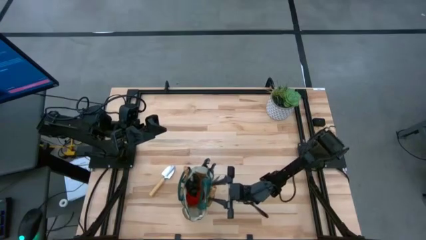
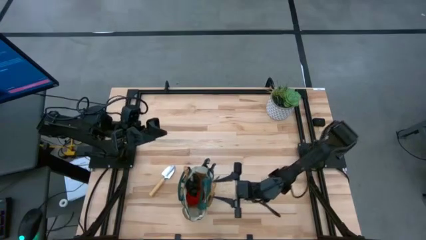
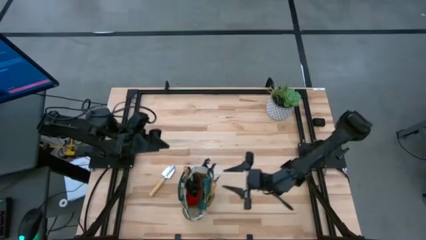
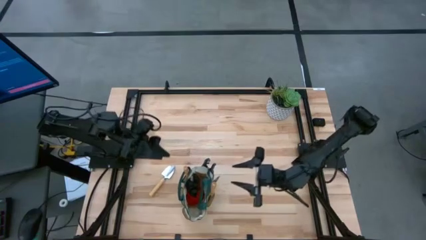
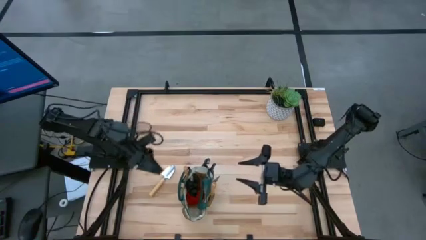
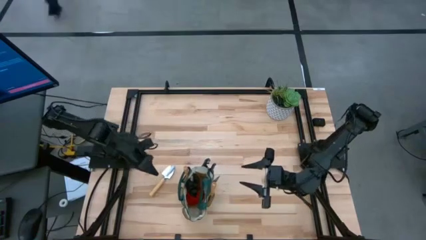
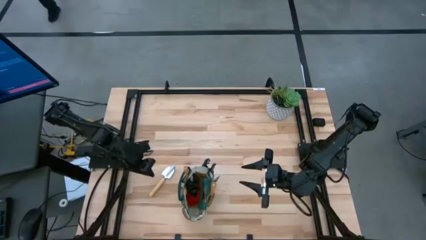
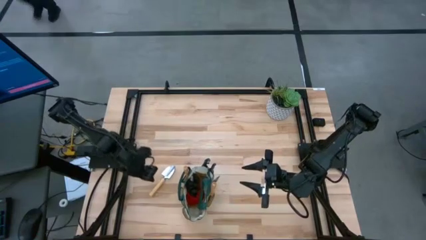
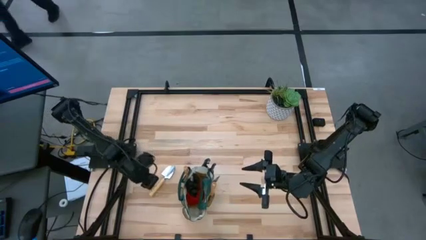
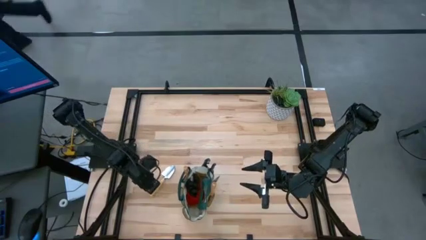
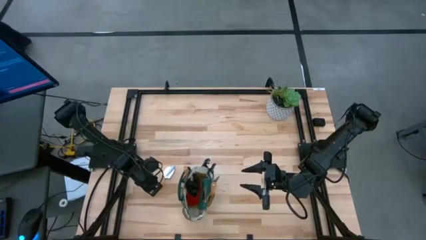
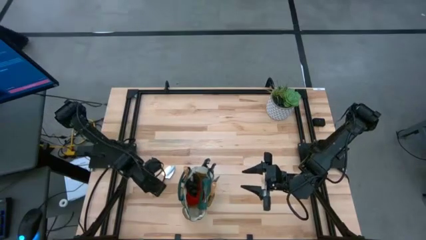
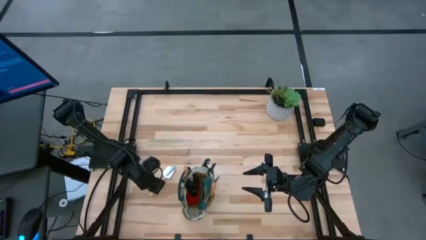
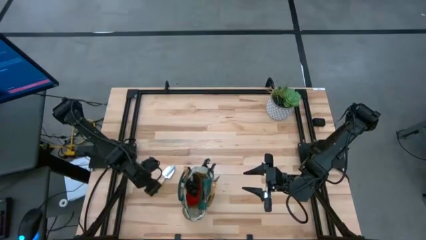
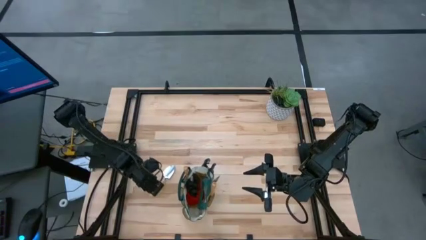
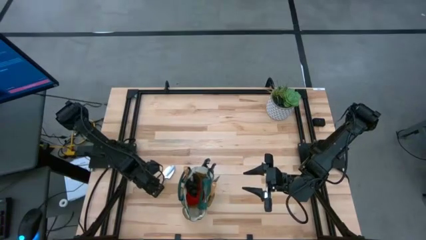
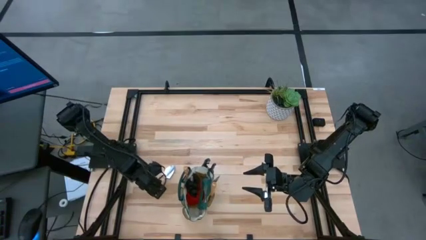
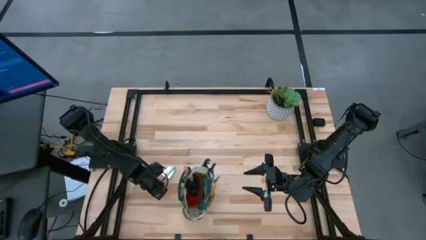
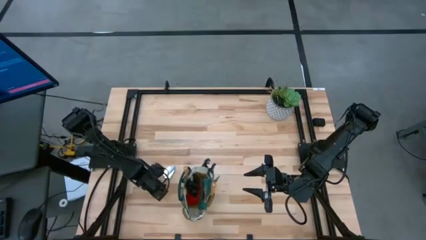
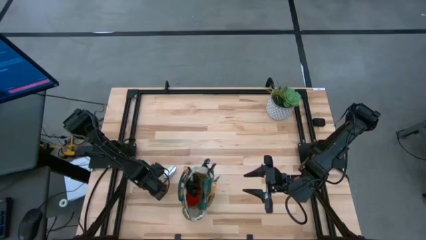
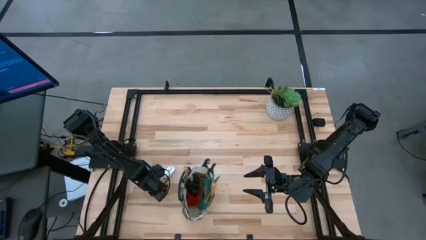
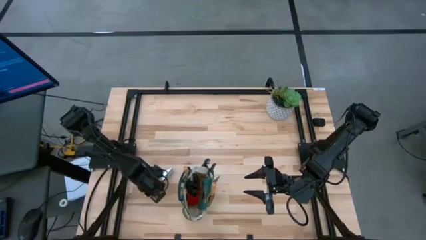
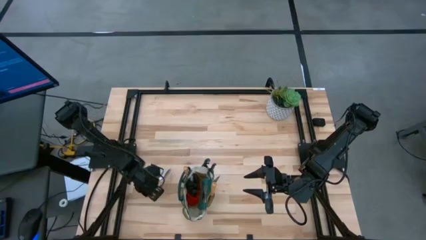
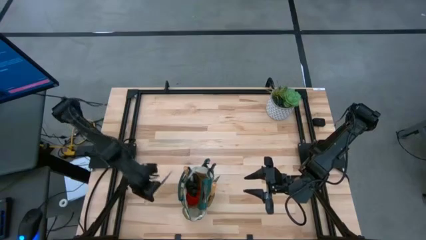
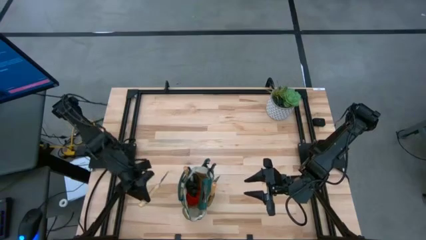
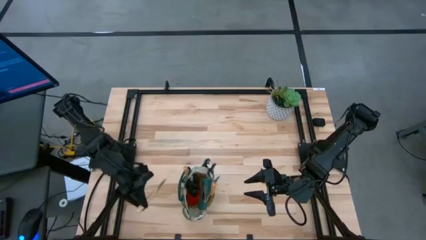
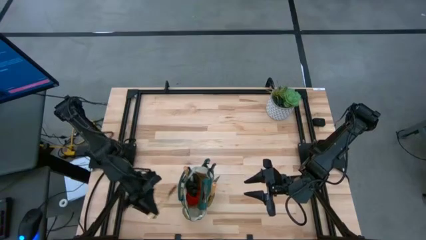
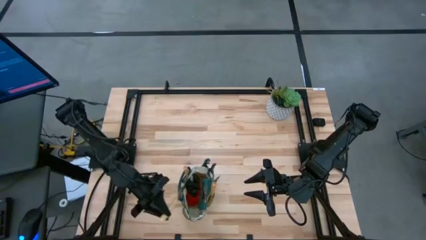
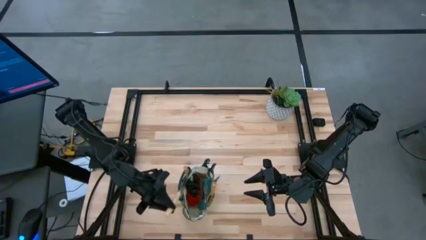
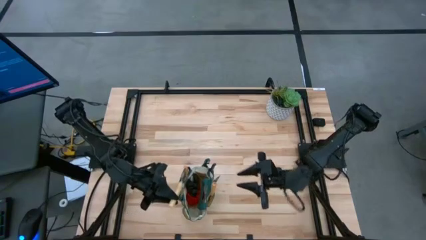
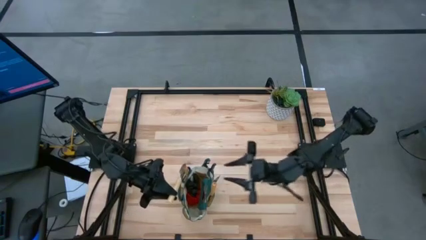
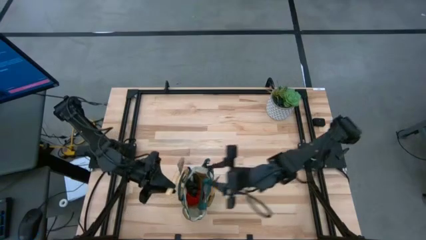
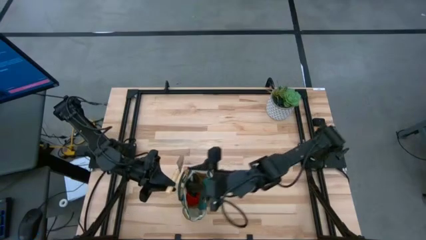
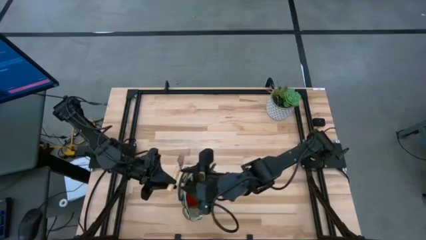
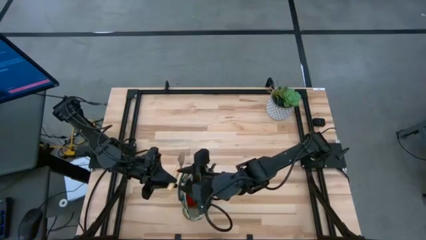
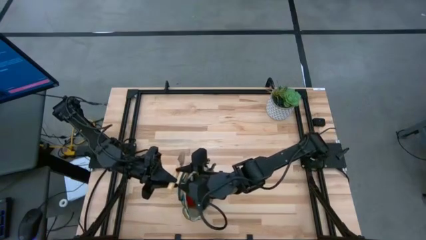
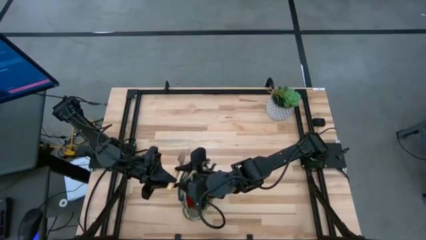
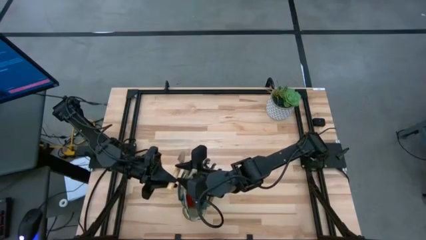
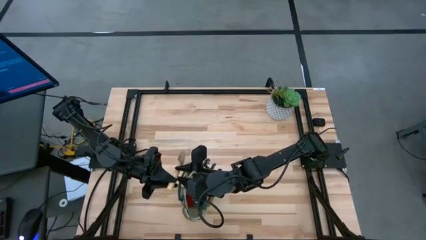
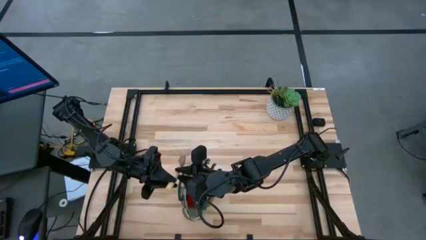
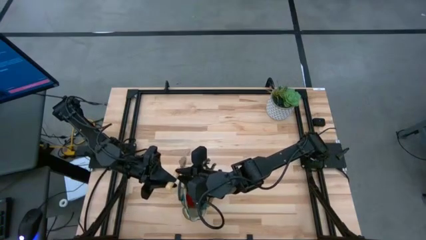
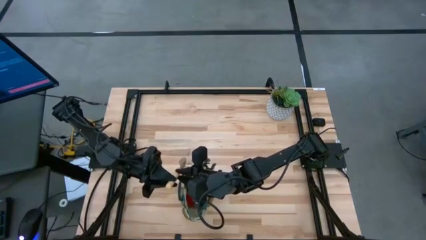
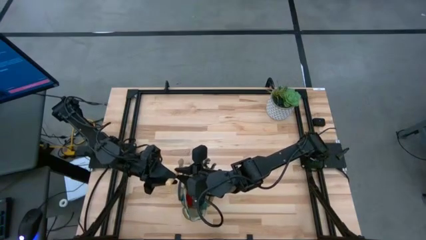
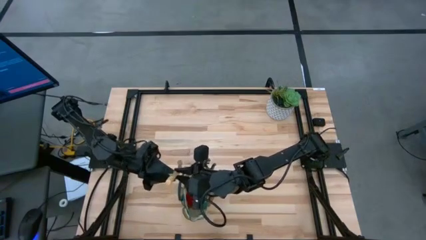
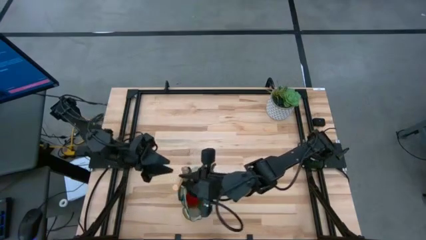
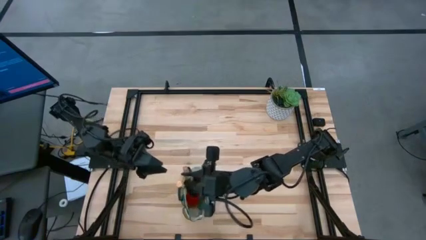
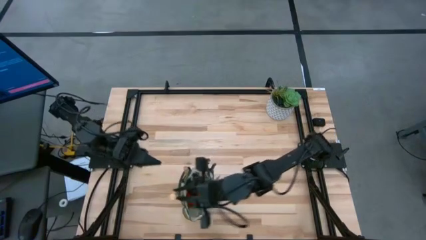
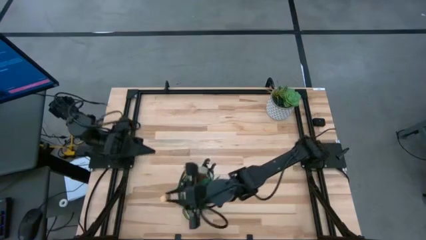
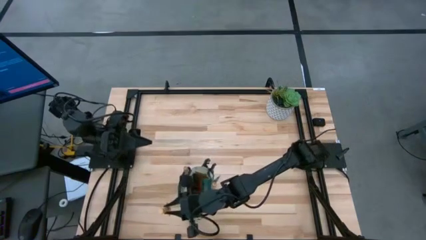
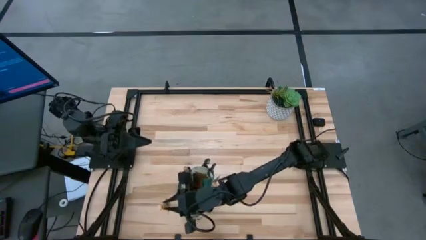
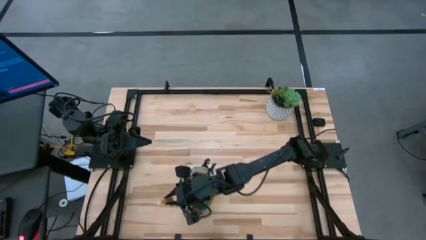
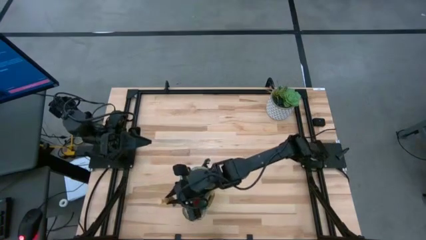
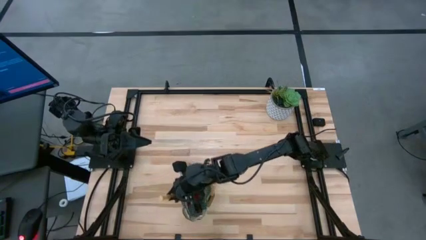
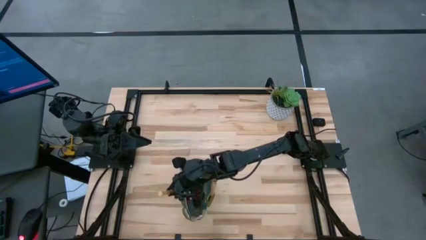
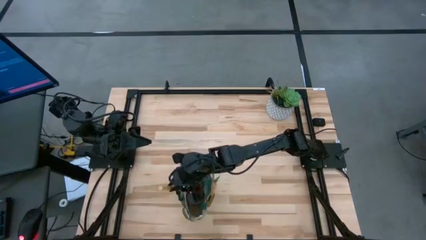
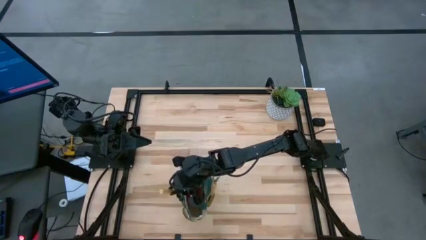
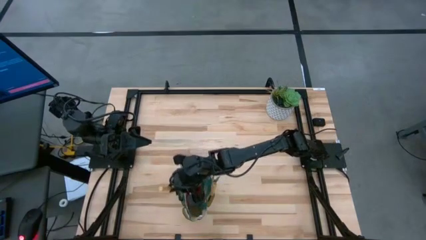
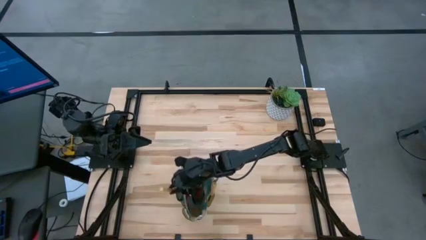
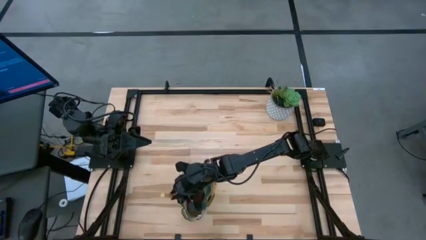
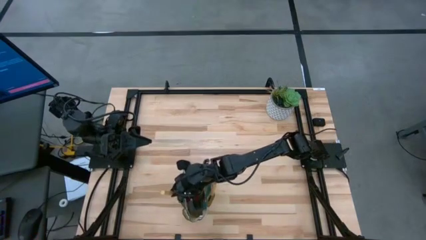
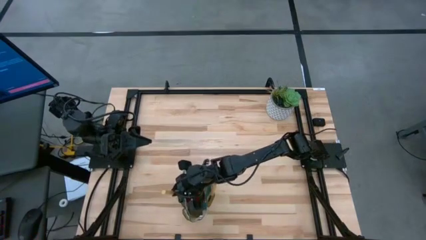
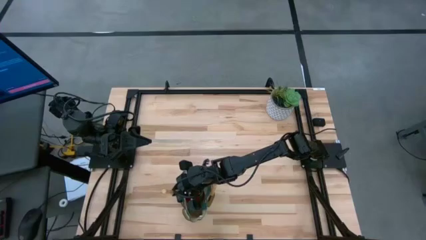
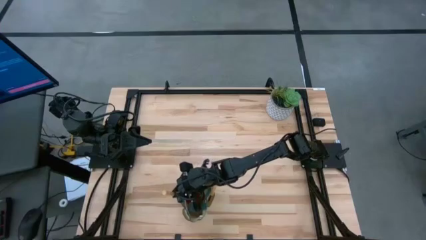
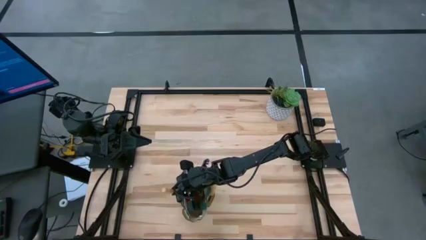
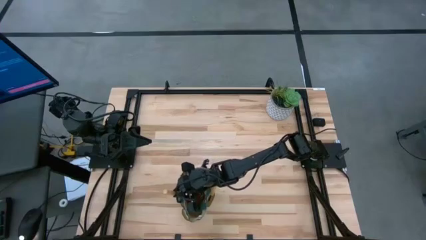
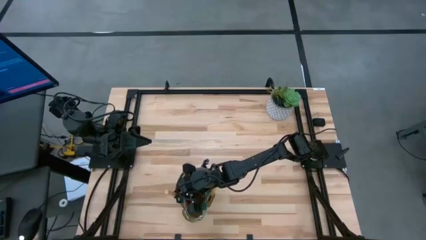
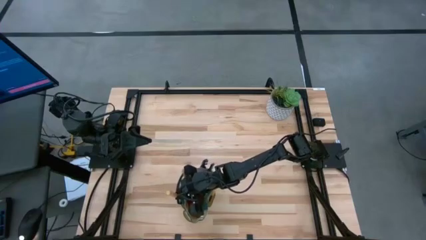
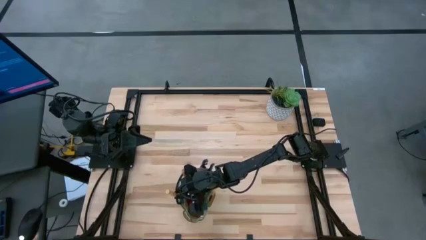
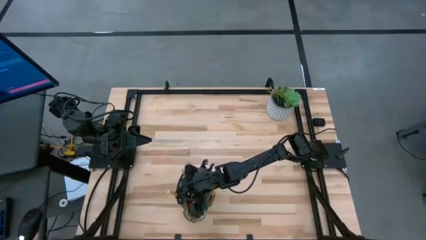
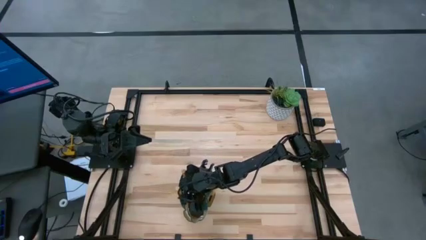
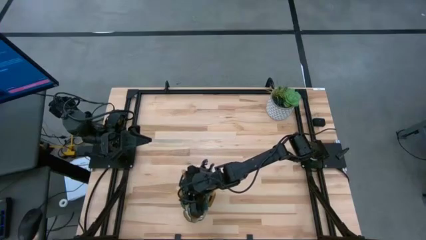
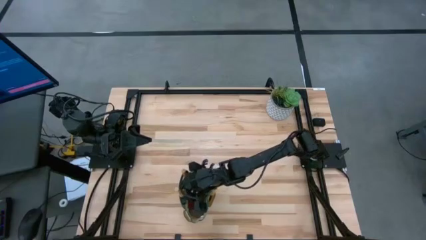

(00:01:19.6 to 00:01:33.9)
Task: Pick & Place Garden tools in Gardening bag
Put the brown trowel into the gardening bag
